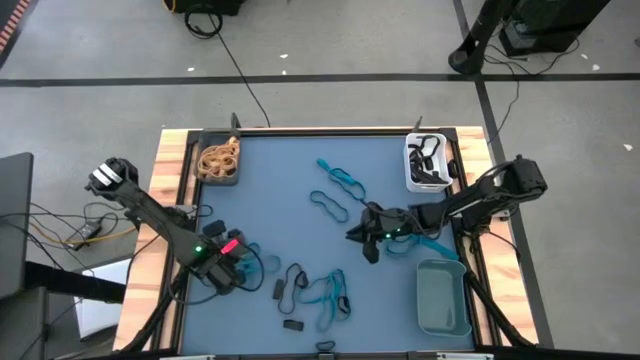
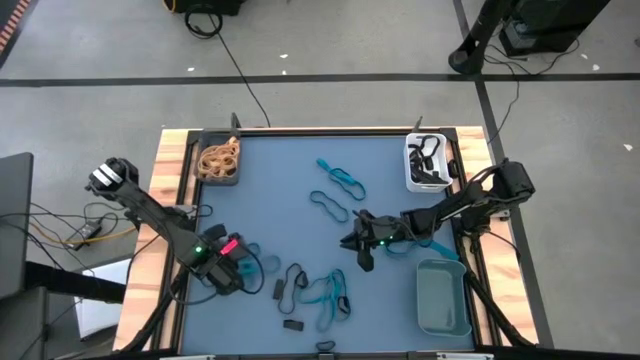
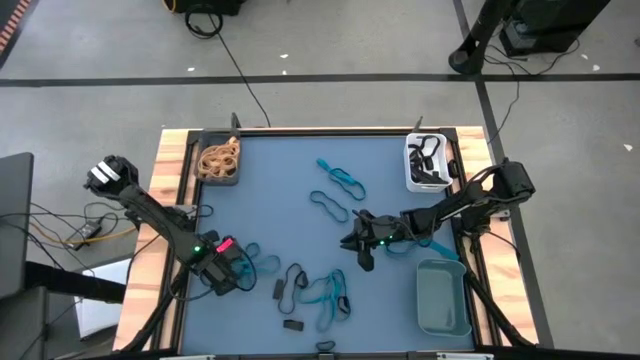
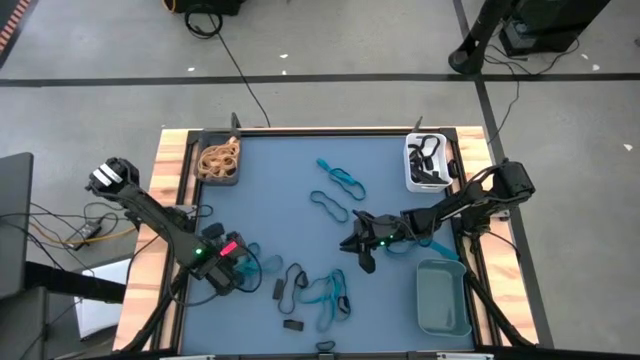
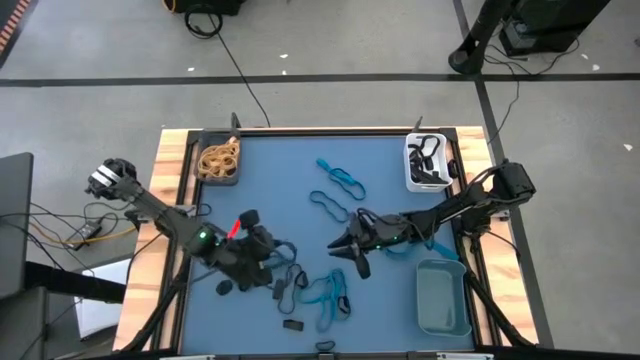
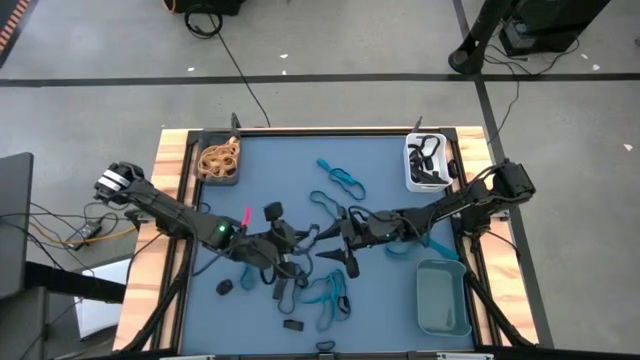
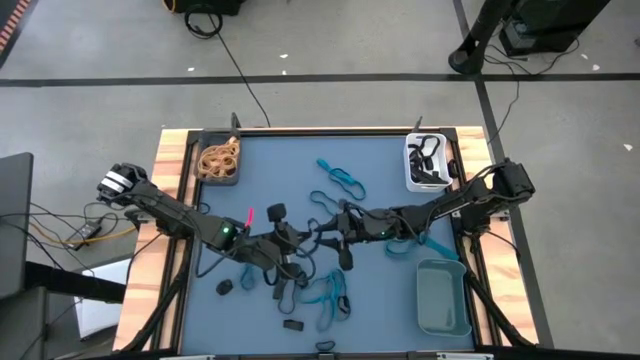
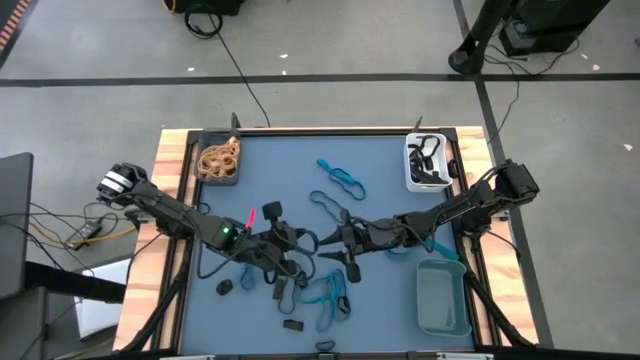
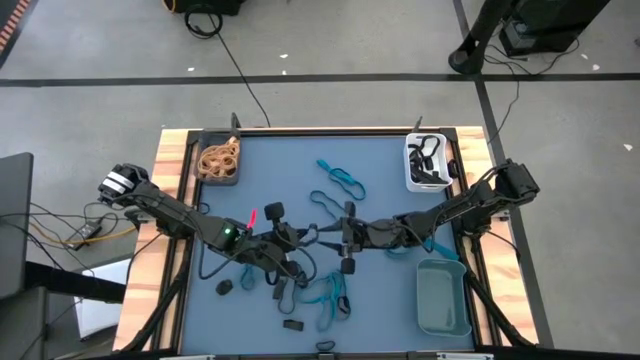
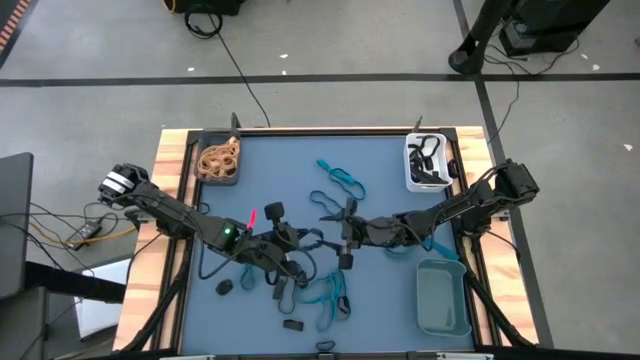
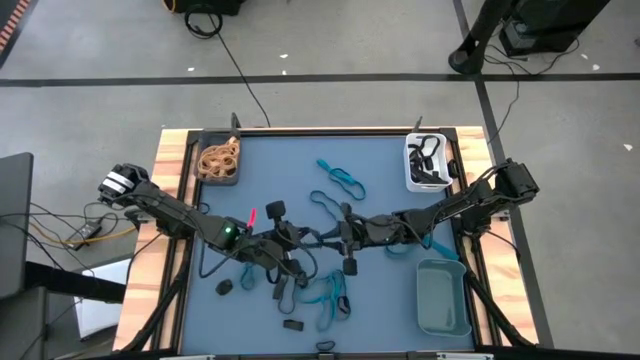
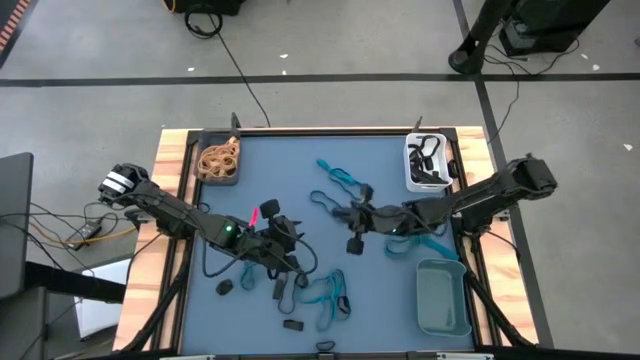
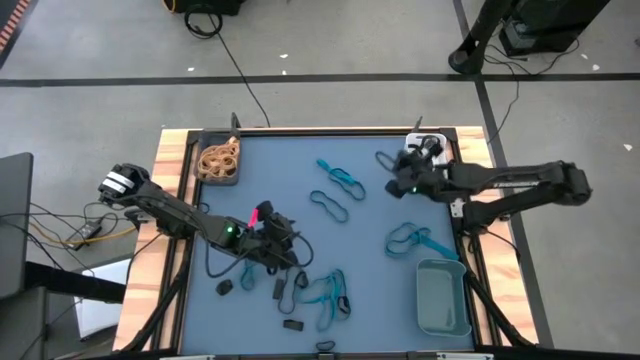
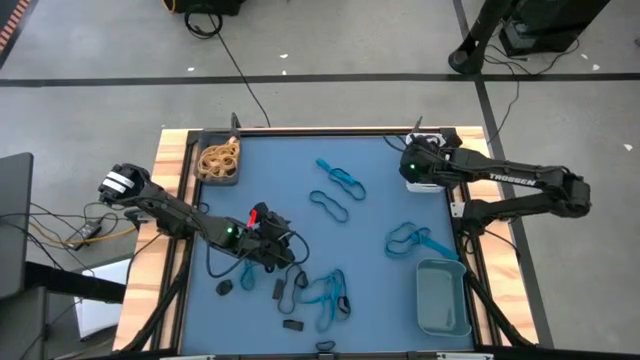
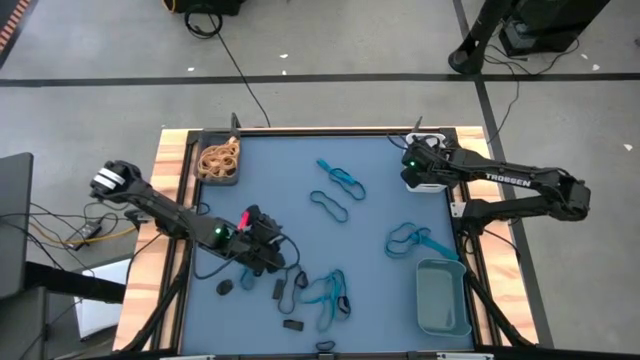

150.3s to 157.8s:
Task: Sort rubber bands into baskets
Put the black rubber band into the white bin

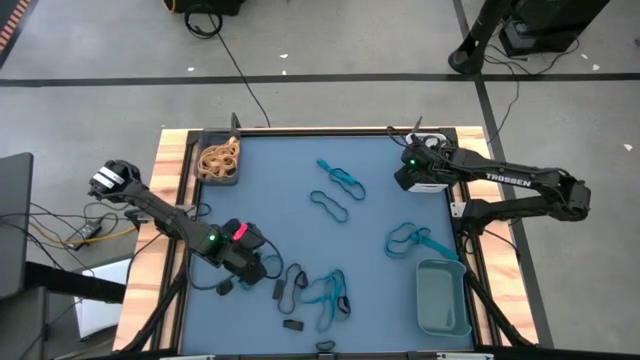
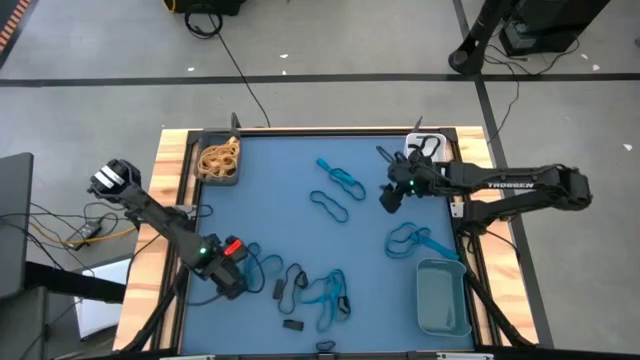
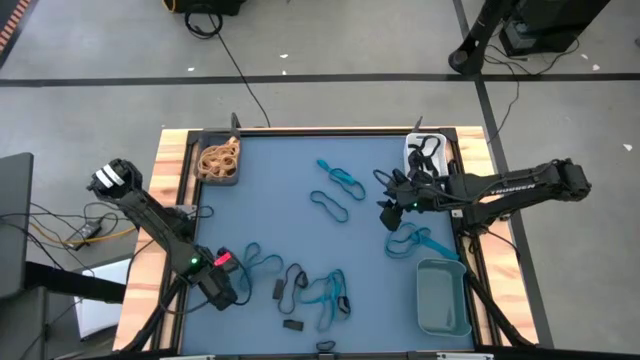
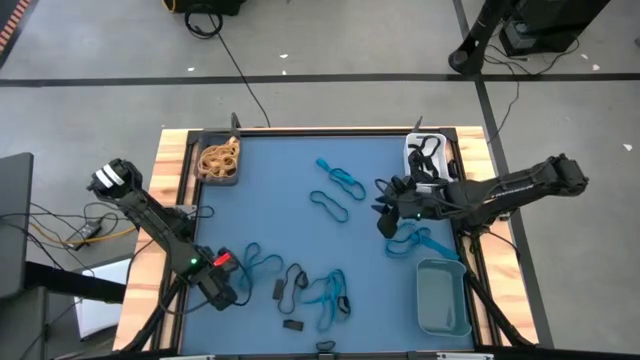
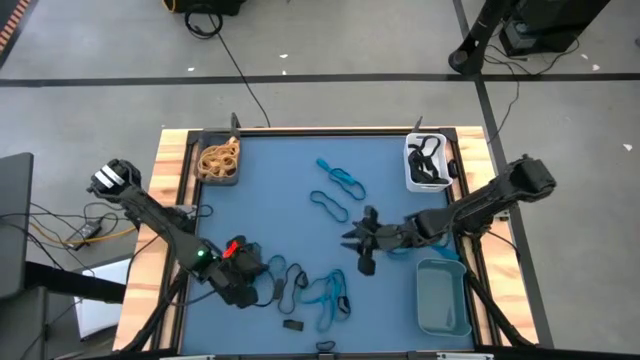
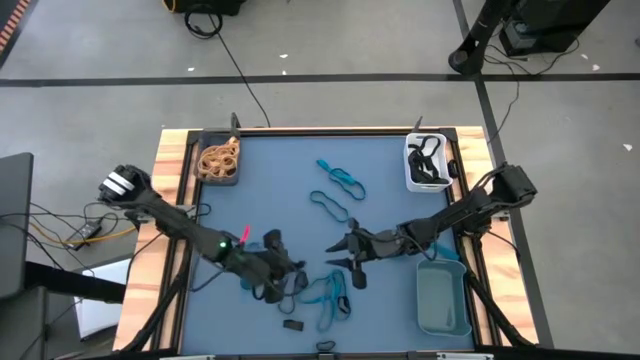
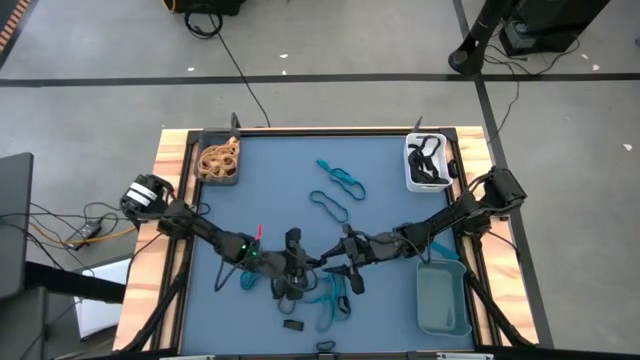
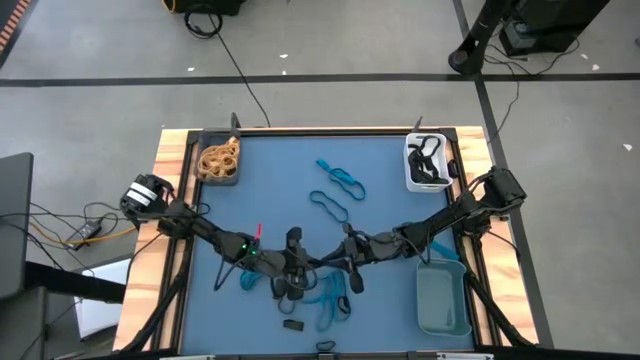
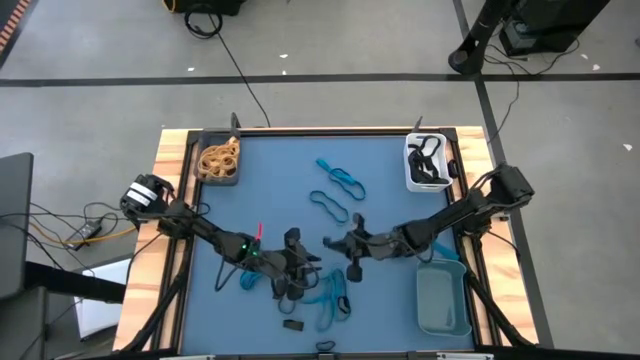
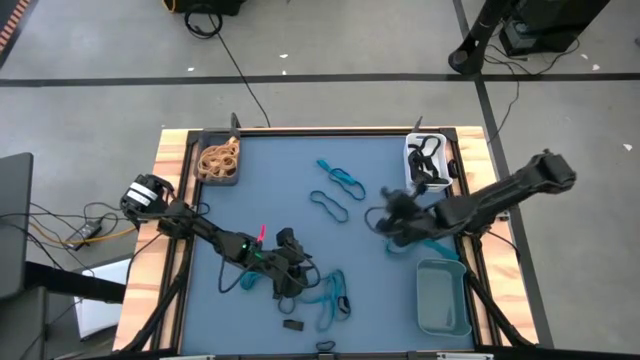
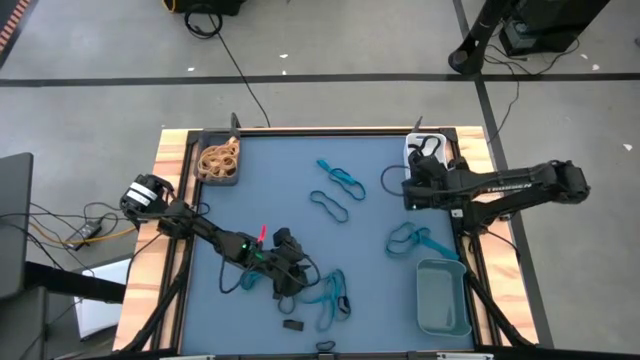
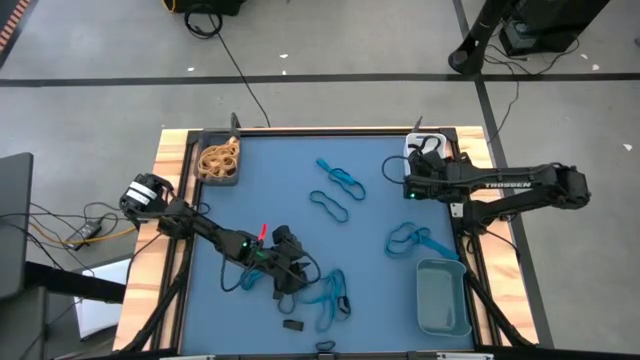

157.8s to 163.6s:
Put the black rubber band into the white bin

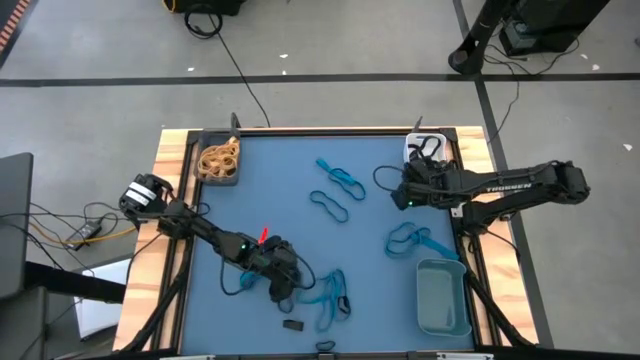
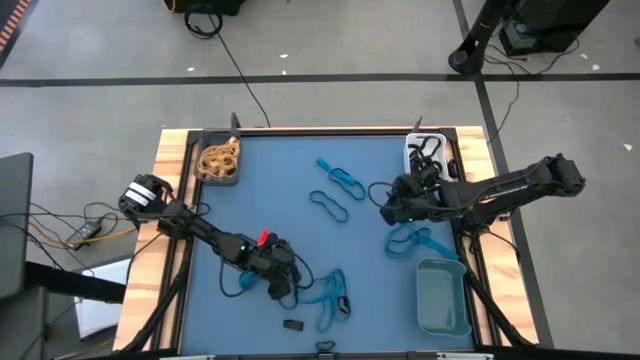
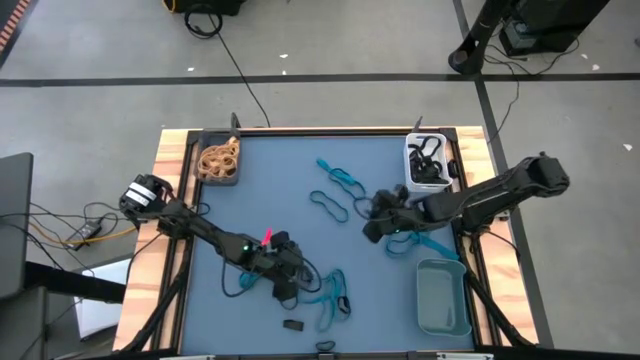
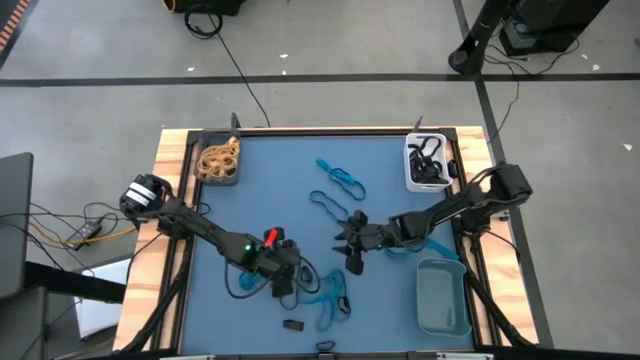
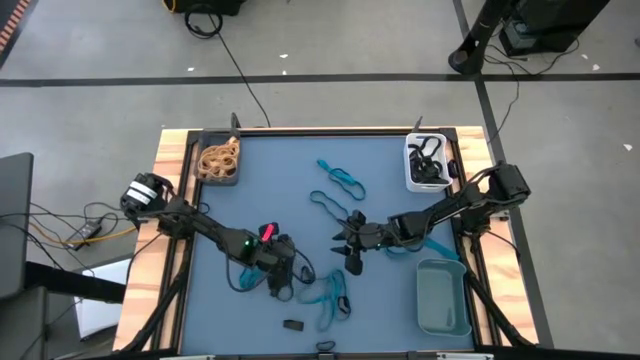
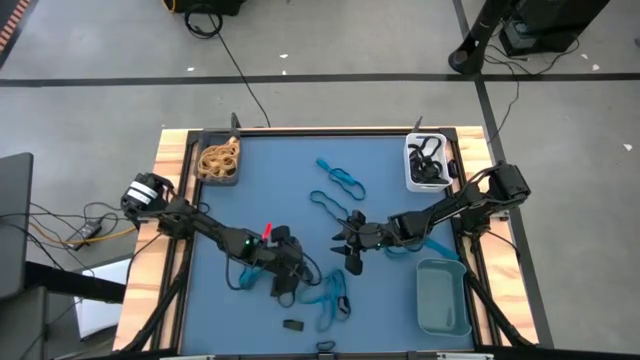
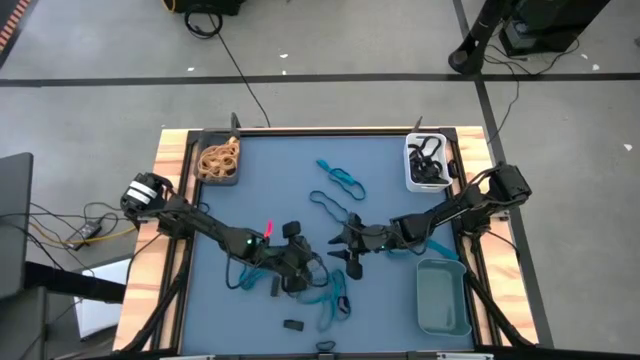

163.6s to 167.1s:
Put the black rubber band into the white bin

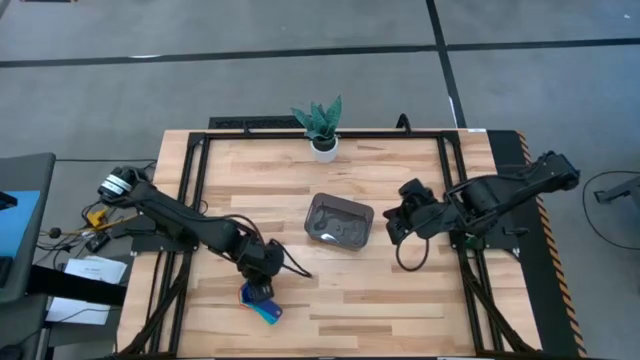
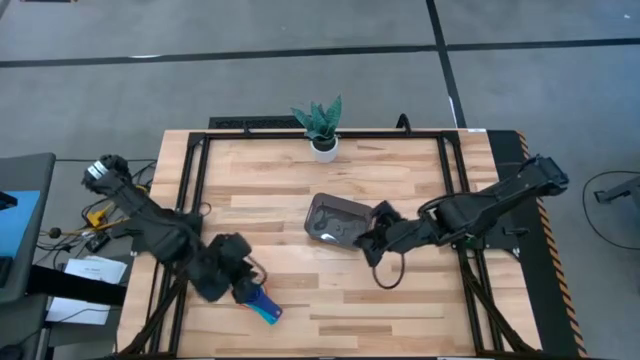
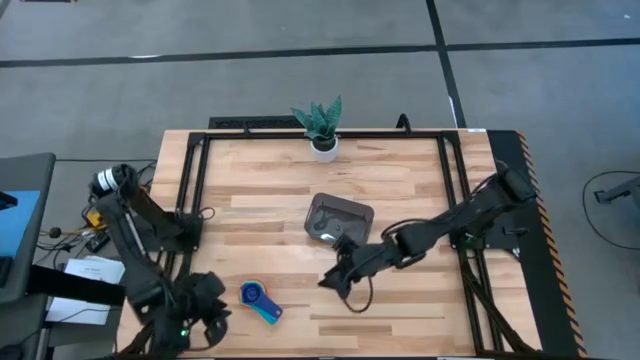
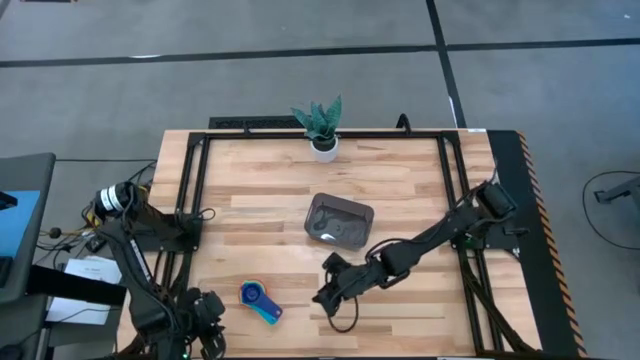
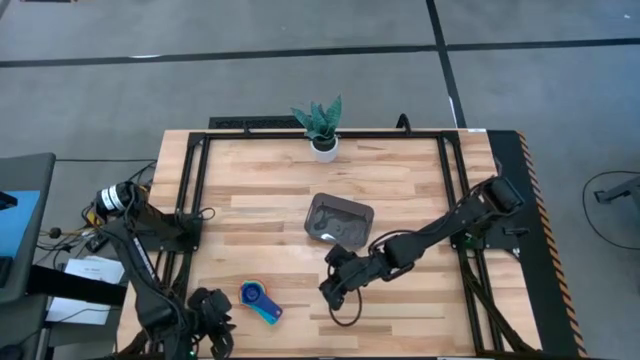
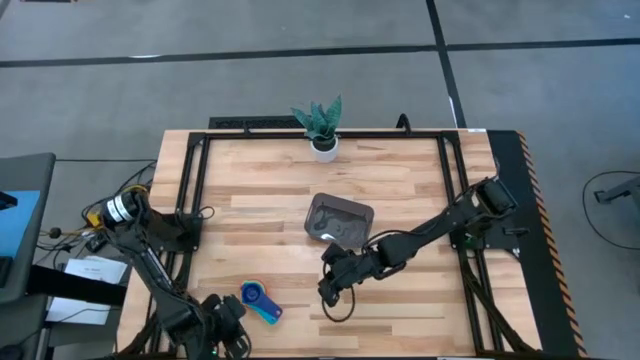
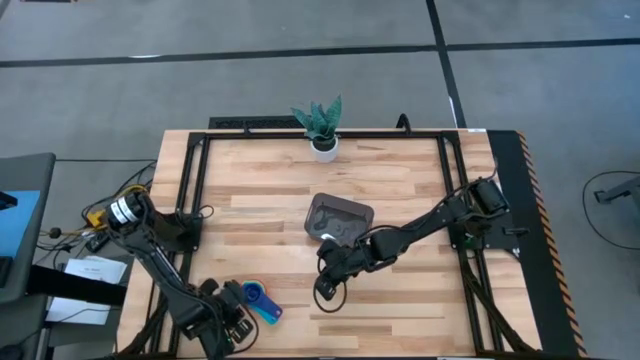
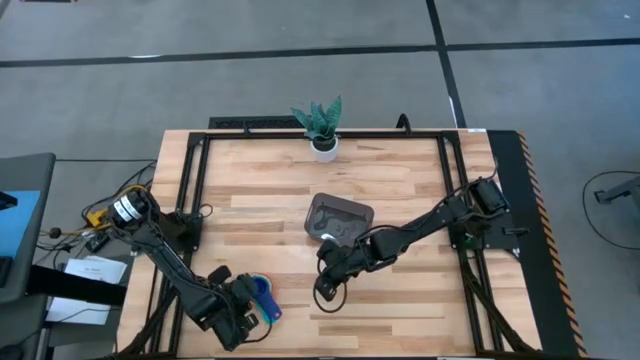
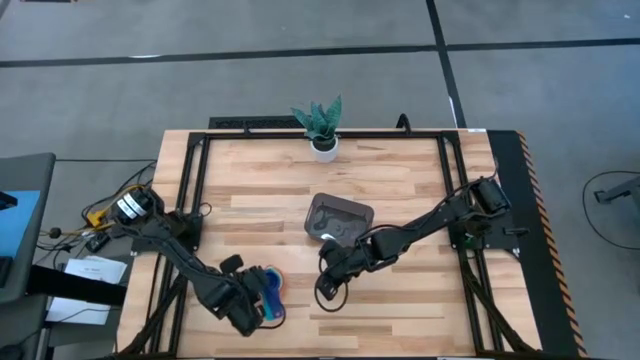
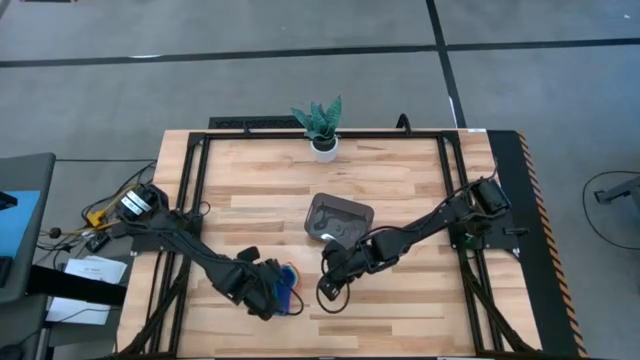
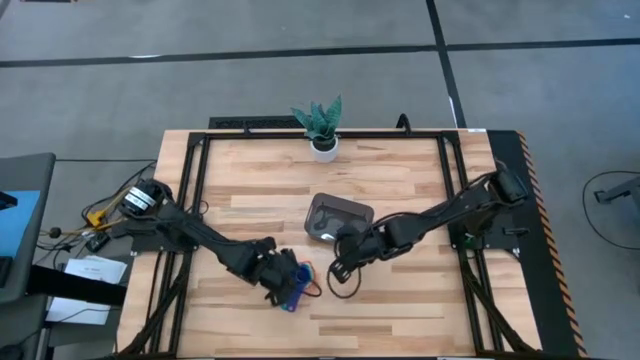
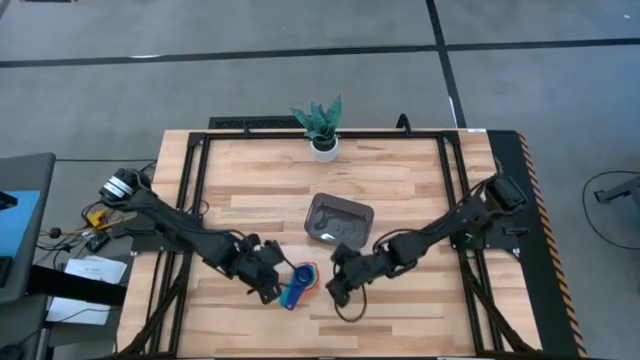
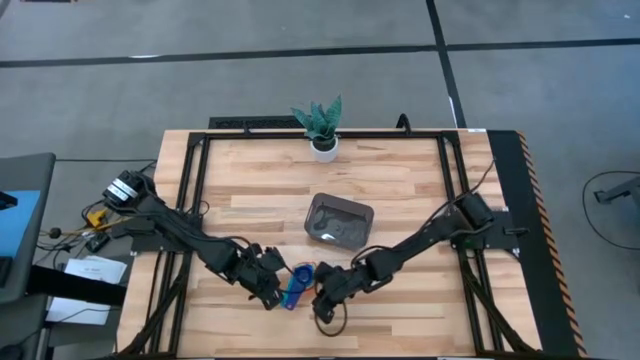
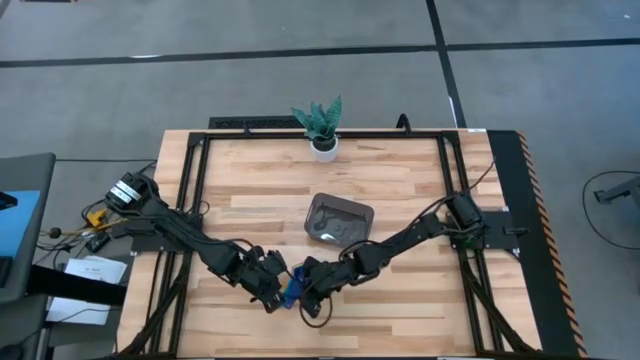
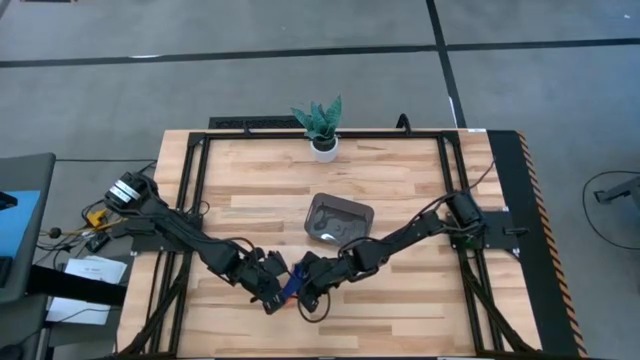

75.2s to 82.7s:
Task: Nest measuring cups in basket
Adjust the stacked measuring cups
